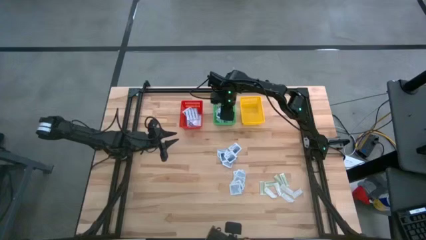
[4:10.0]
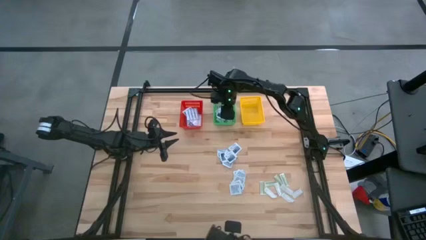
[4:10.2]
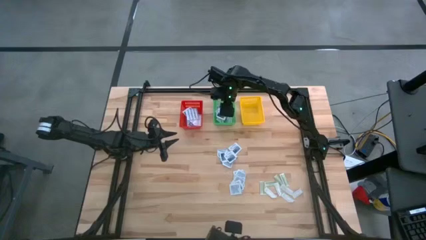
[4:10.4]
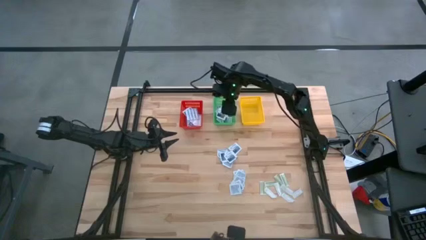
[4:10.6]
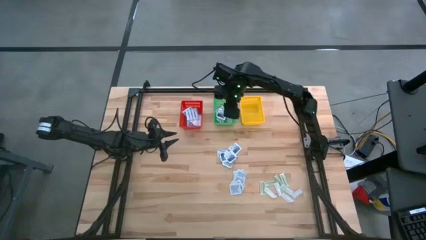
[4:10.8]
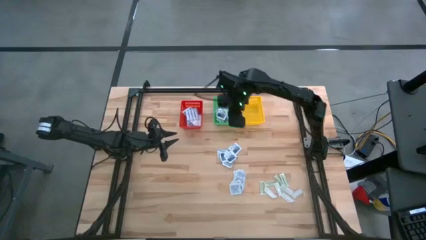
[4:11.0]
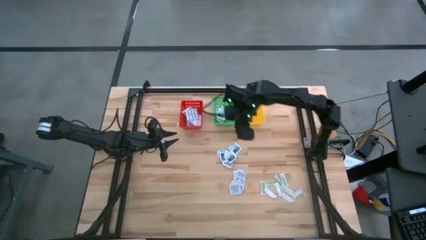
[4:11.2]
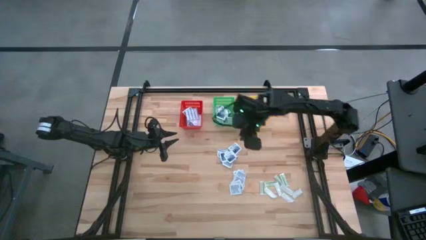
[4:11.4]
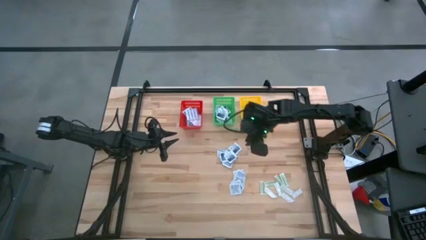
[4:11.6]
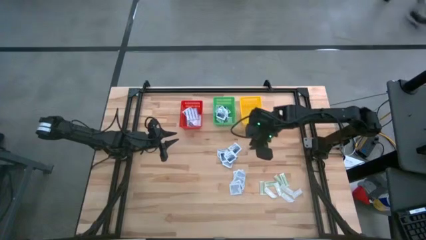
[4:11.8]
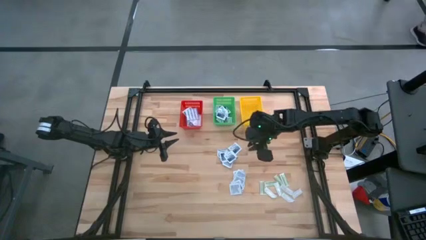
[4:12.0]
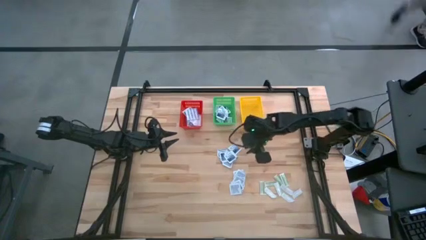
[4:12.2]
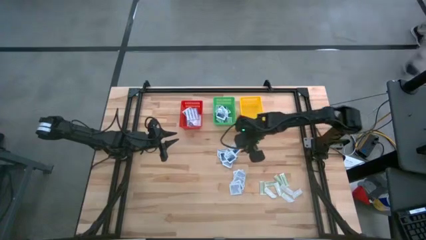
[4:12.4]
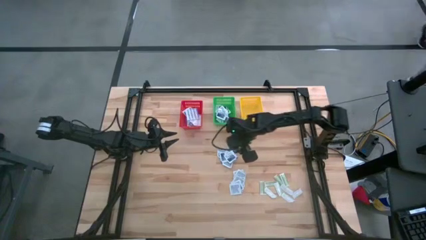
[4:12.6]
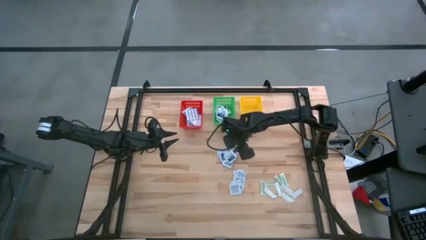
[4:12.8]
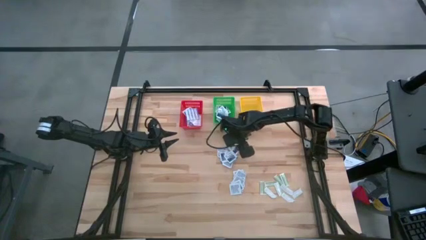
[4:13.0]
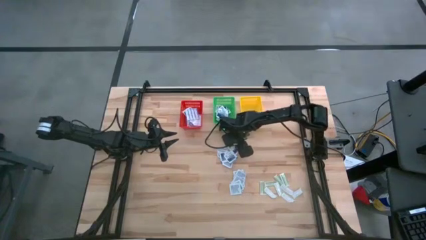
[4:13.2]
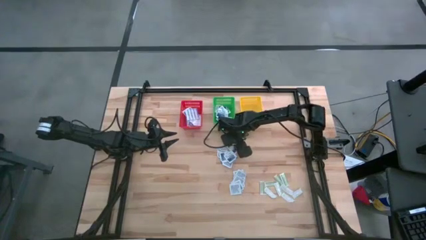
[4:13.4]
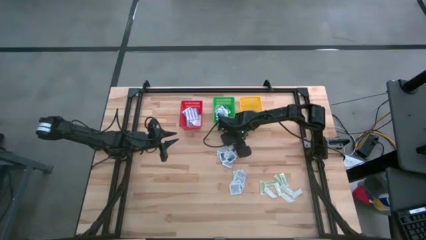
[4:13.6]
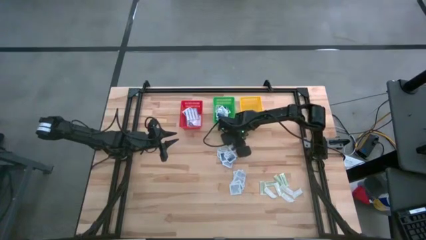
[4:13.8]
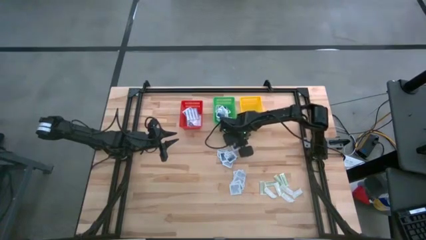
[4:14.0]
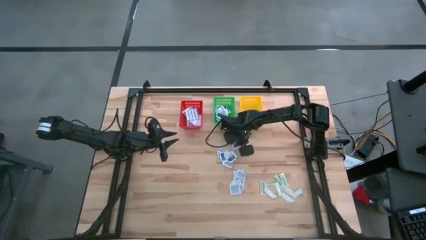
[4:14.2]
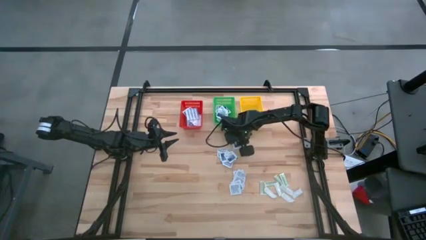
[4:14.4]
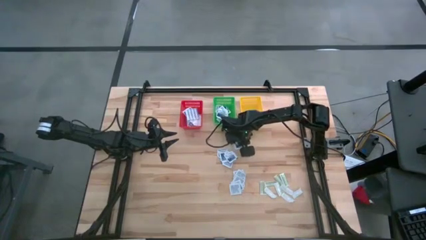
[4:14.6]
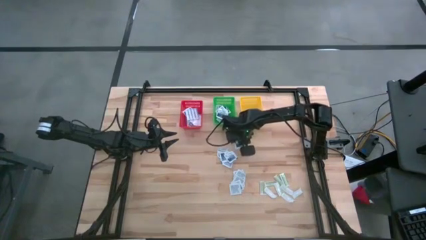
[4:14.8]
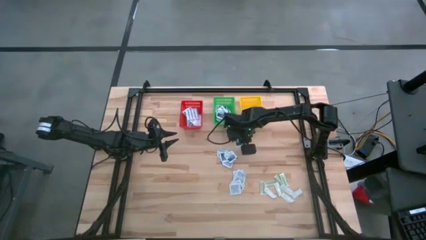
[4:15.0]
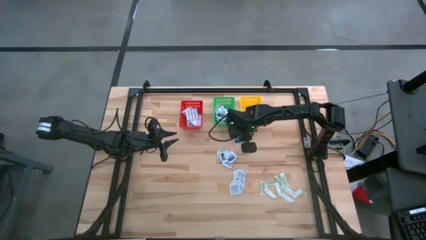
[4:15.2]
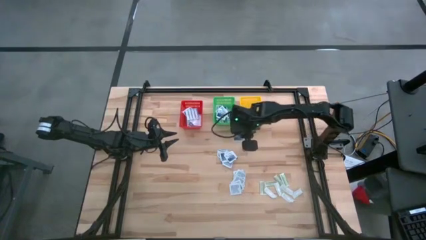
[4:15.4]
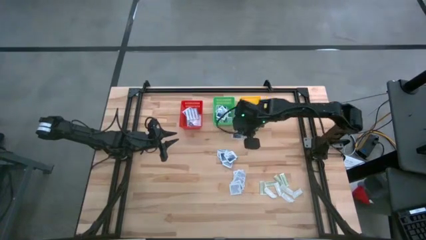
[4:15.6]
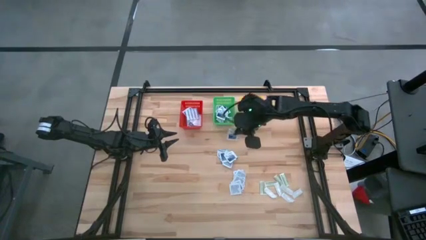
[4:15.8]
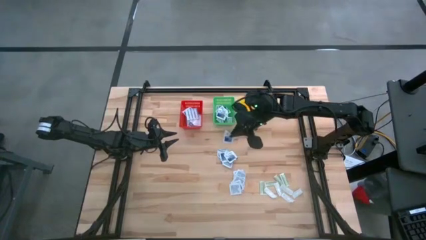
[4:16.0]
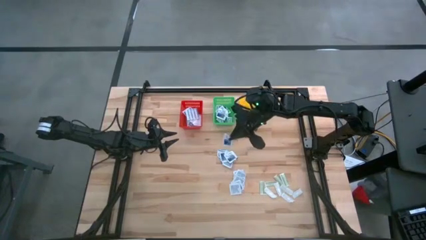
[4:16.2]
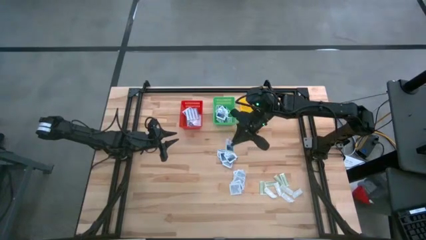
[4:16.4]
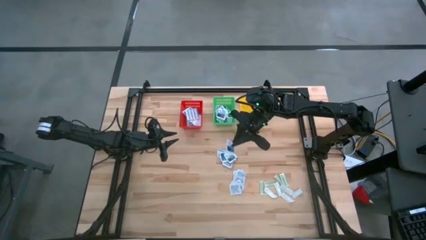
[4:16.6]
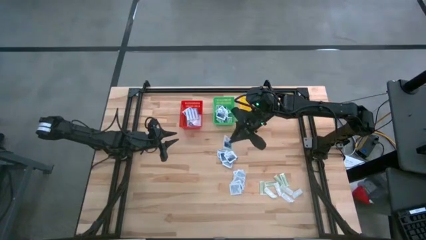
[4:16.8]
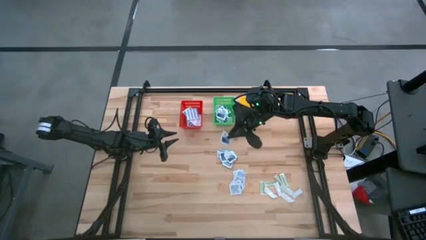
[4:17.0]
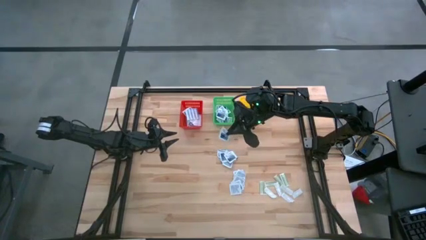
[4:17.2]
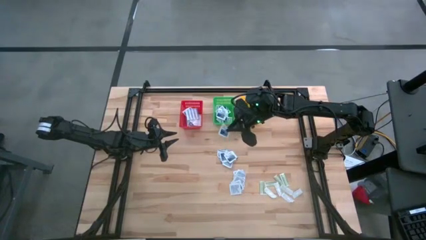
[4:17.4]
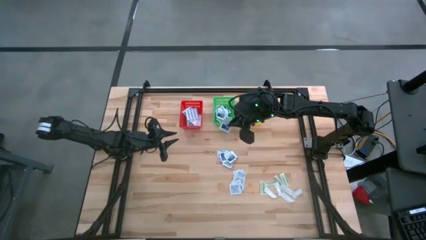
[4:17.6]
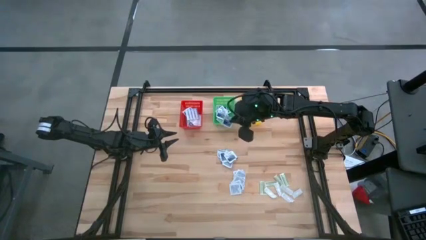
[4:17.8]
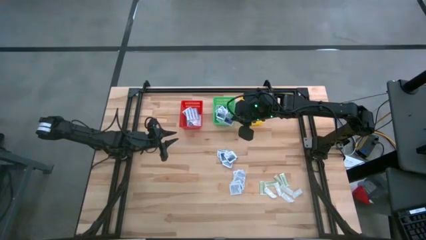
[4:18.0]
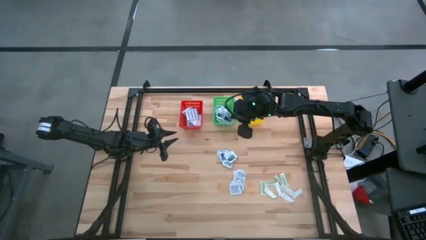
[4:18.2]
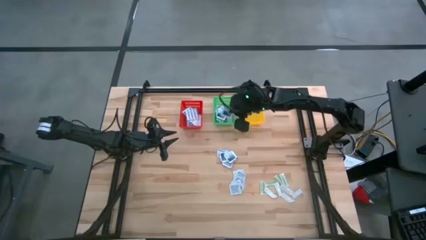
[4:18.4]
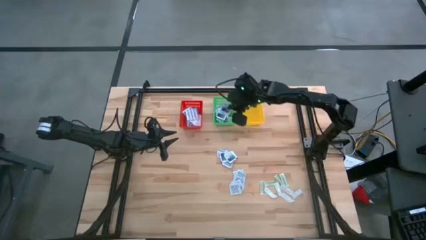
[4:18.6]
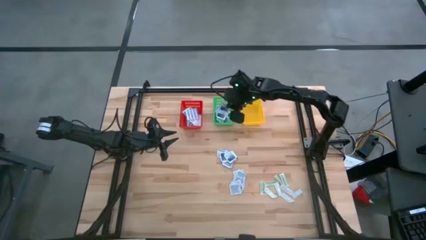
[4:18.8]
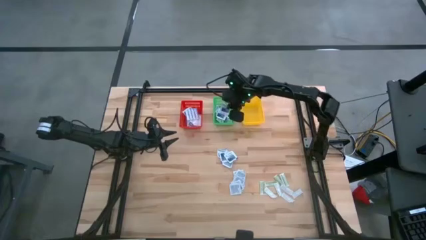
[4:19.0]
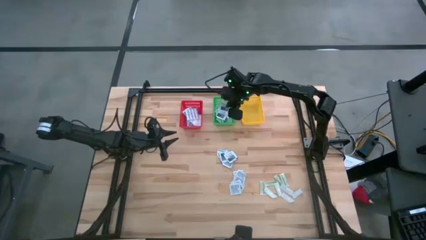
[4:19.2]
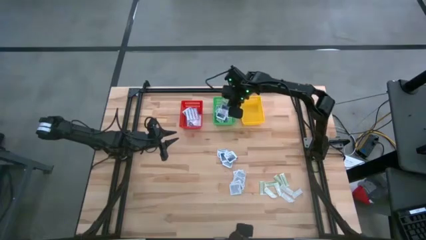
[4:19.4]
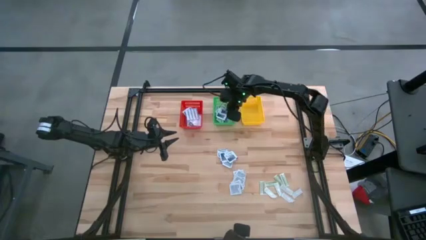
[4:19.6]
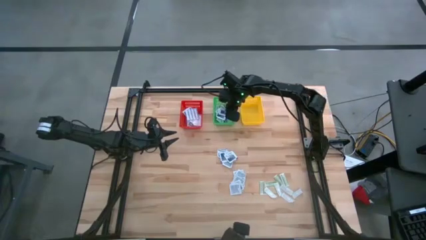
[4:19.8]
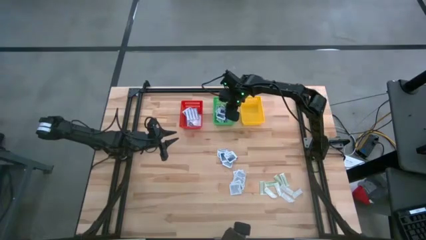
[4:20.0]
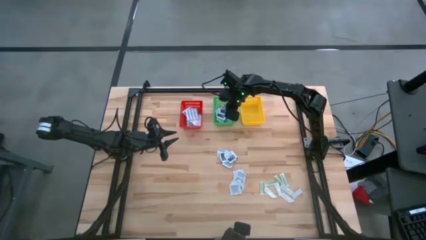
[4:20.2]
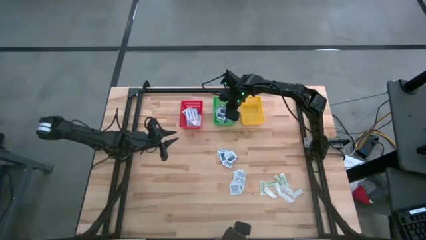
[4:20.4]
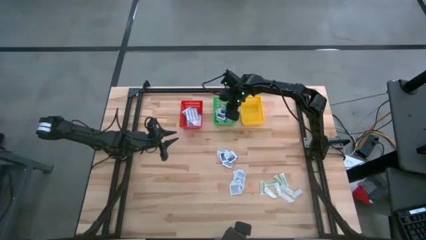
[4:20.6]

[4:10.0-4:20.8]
Task: Pick & Place First Aid Supplies
Put the alcohol pad into the green basket

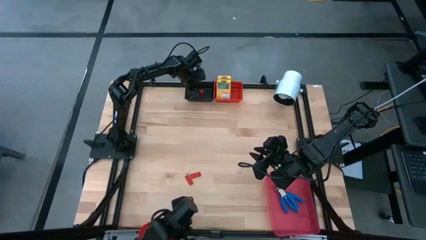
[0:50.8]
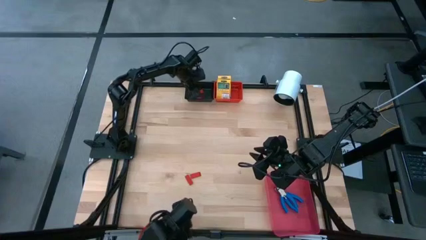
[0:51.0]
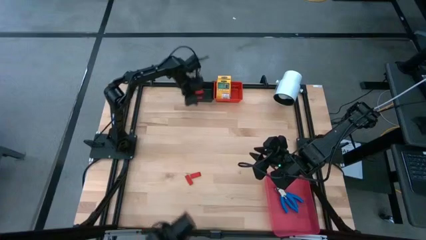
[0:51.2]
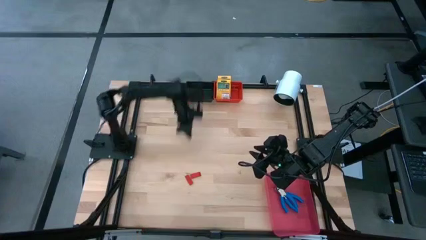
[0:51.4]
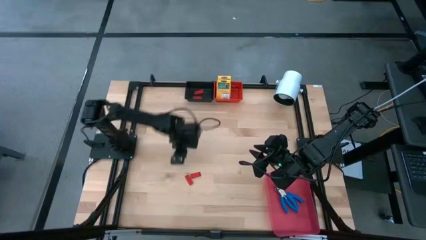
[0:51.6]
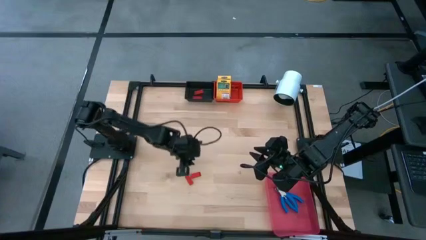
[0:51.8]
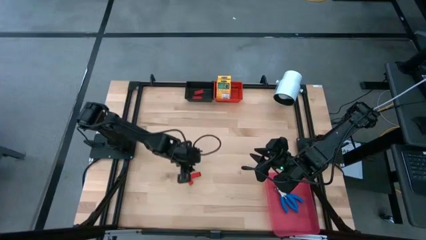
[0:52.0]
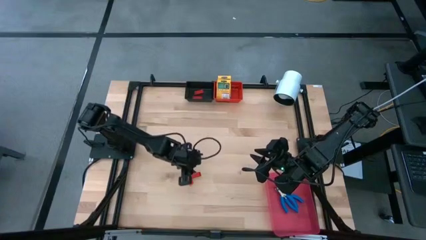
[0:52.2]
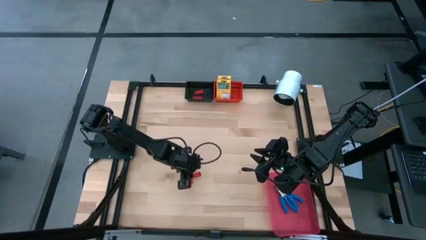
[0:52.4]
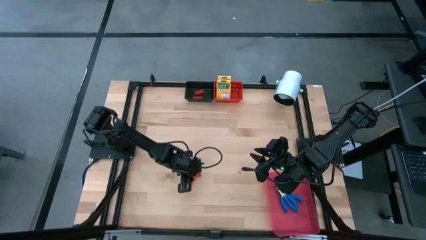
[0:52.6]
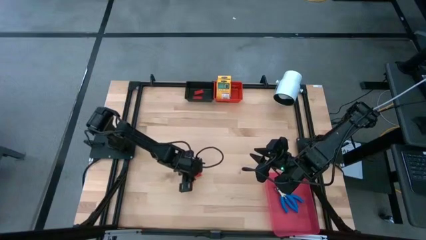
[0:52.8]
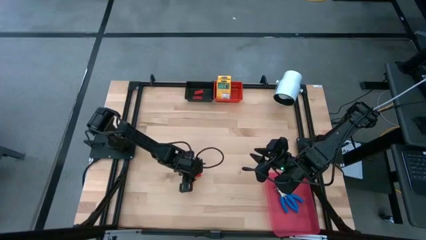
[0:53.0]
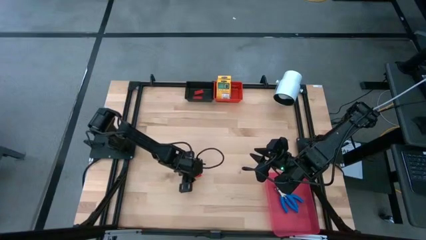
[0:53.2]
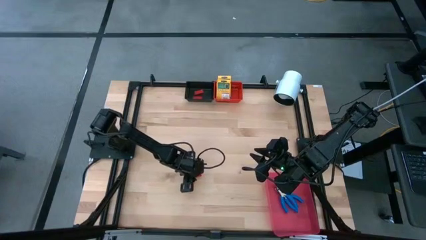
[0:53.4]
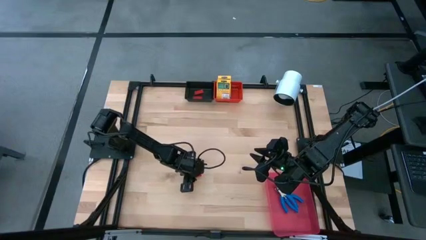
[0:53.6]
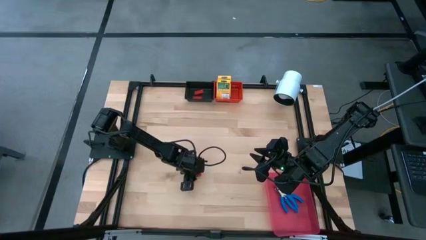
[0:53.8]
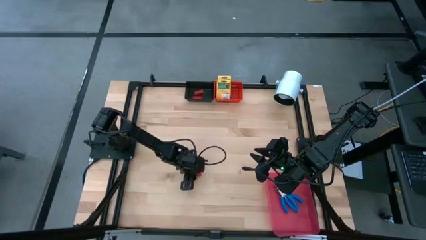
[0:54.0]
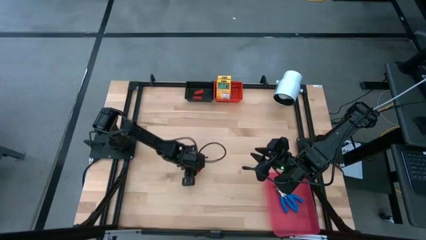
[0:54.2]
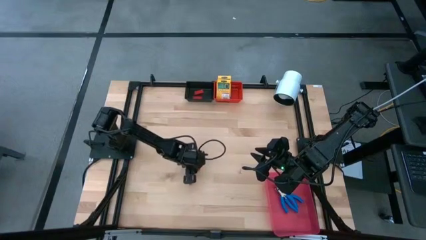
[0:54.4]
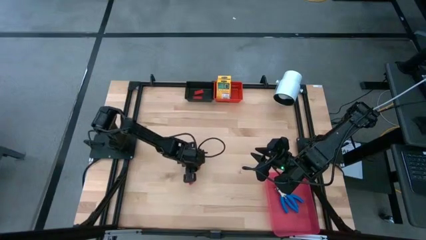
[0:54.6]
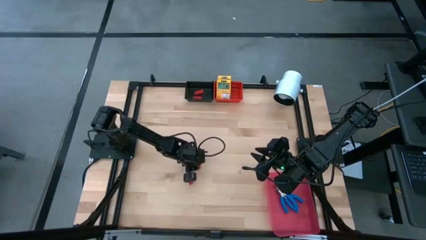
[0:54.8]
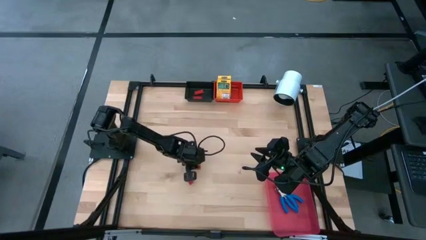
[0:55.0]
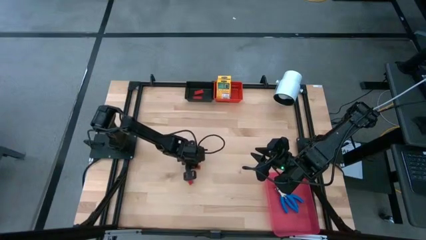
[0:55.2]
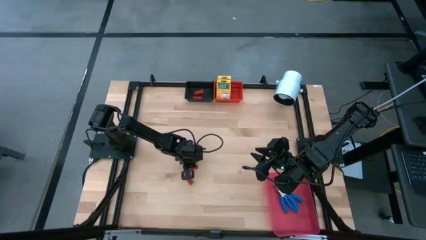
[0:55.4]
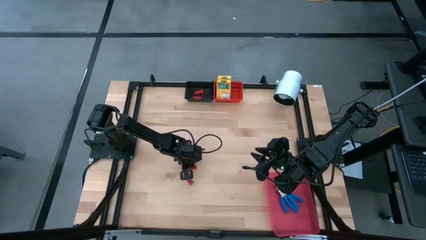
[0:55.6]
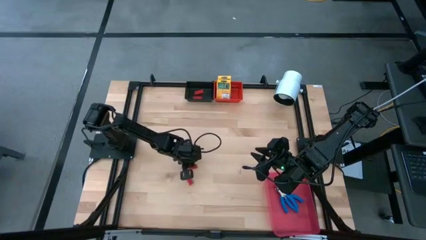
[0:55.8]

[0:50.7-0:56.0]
Task: Pick & Place School Supplies
Put the red eraser into the black bin
